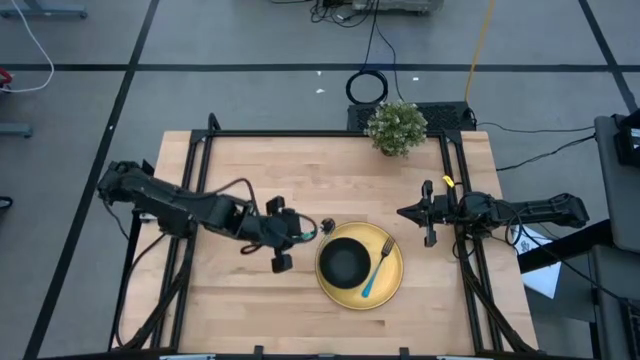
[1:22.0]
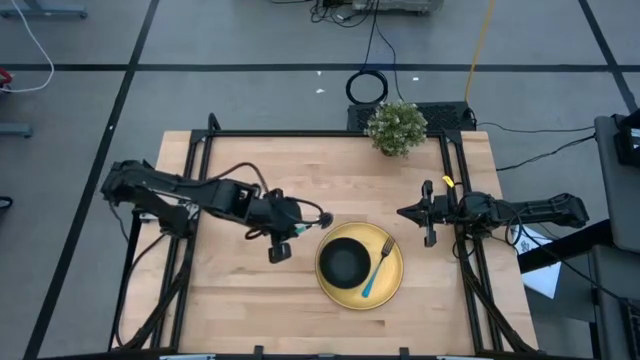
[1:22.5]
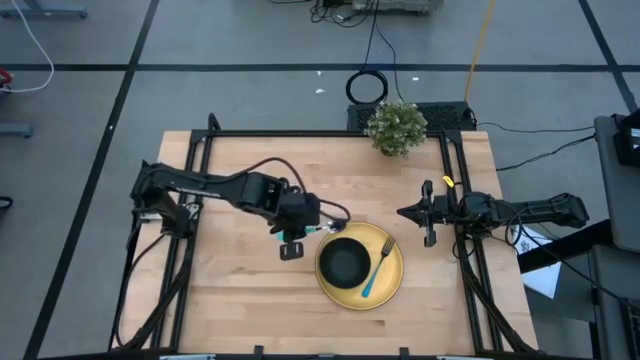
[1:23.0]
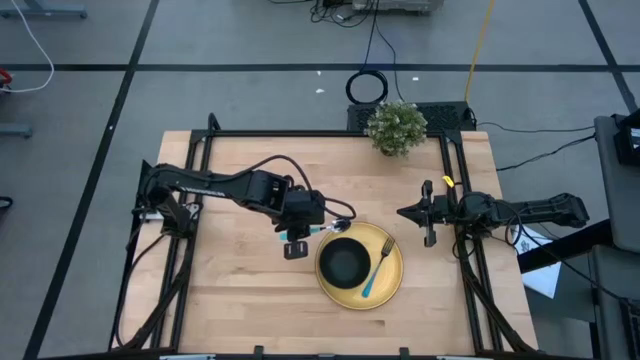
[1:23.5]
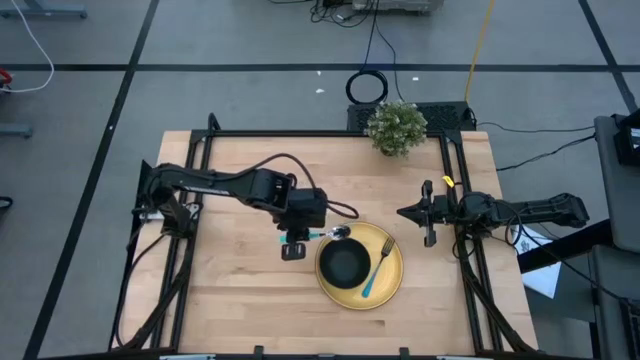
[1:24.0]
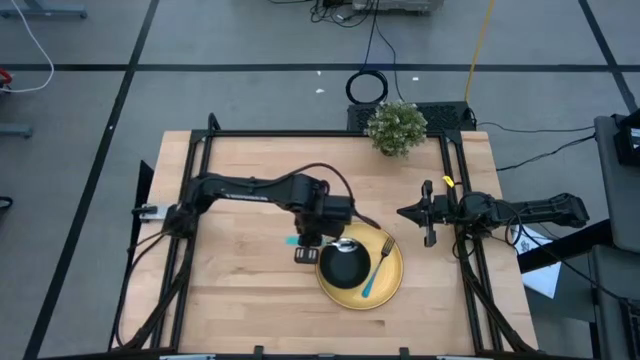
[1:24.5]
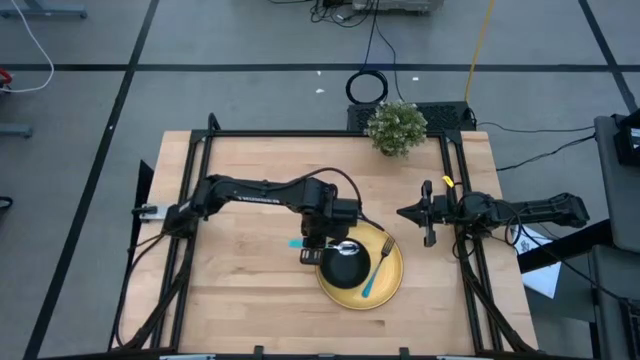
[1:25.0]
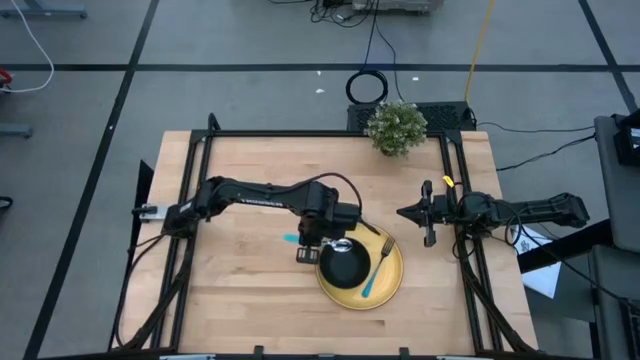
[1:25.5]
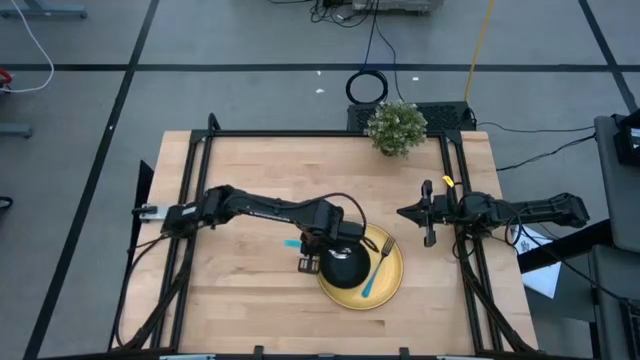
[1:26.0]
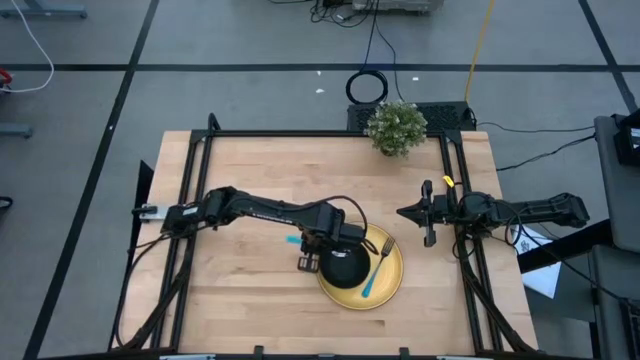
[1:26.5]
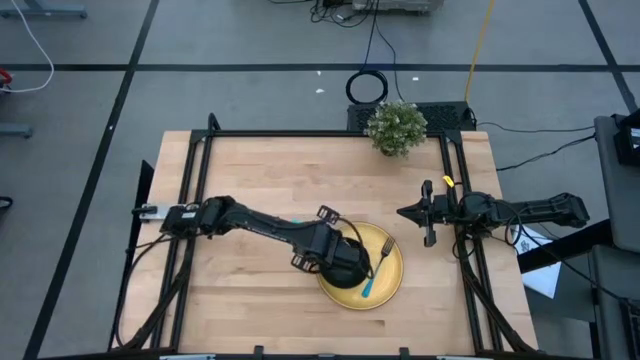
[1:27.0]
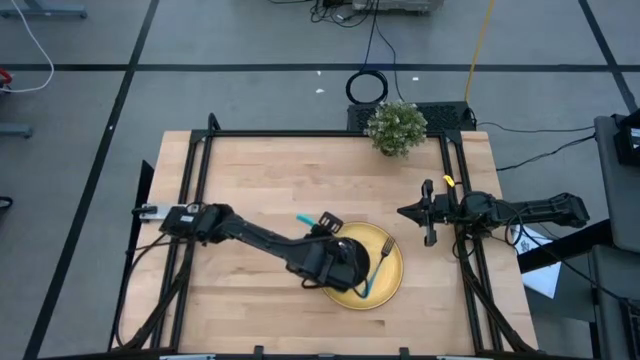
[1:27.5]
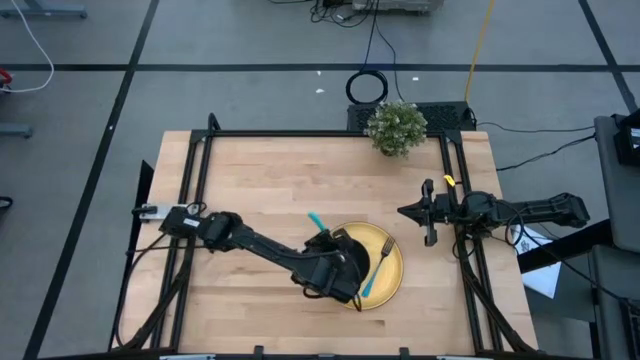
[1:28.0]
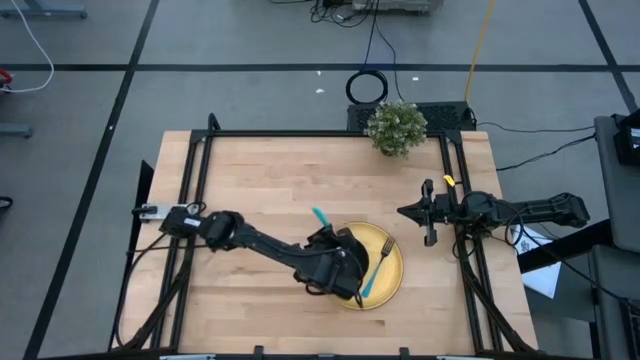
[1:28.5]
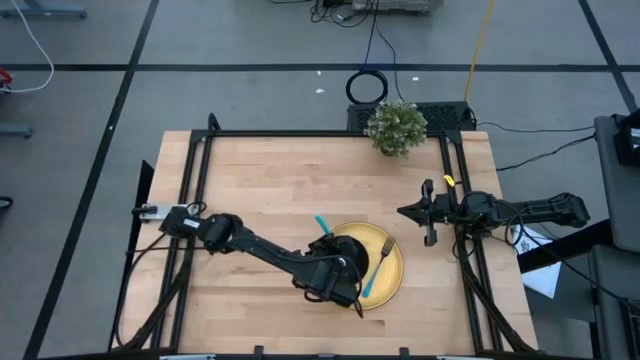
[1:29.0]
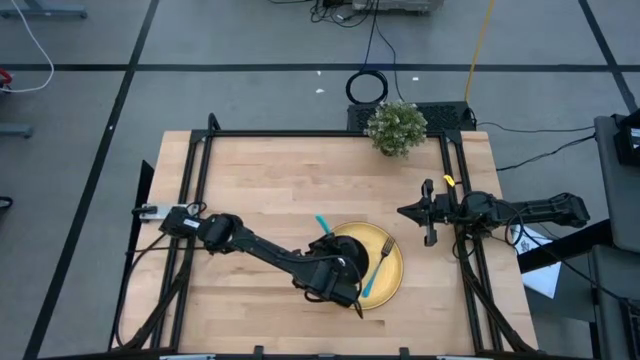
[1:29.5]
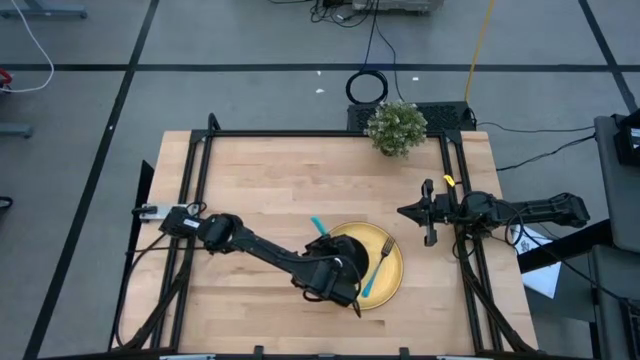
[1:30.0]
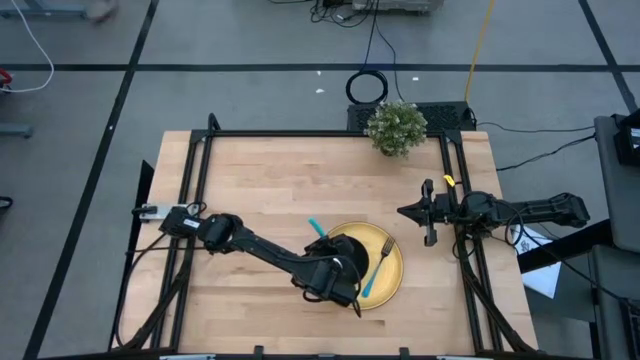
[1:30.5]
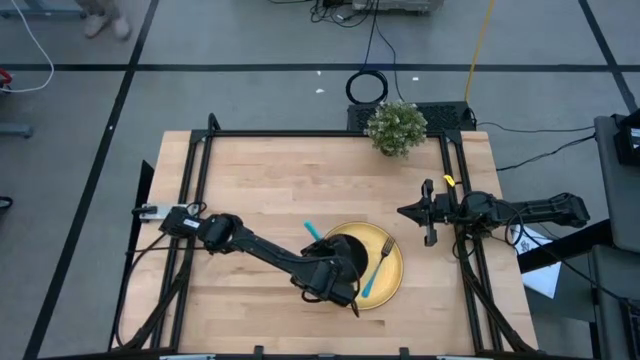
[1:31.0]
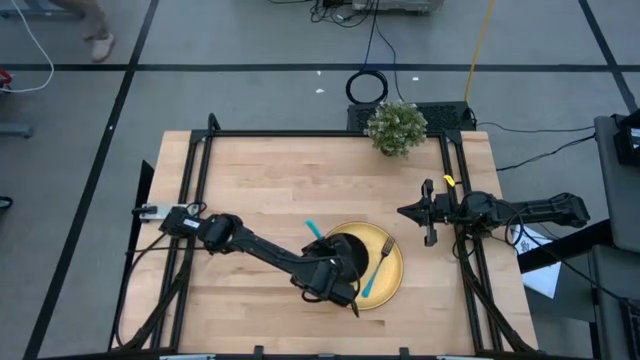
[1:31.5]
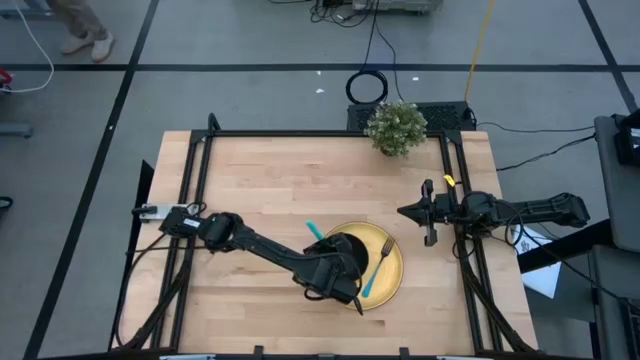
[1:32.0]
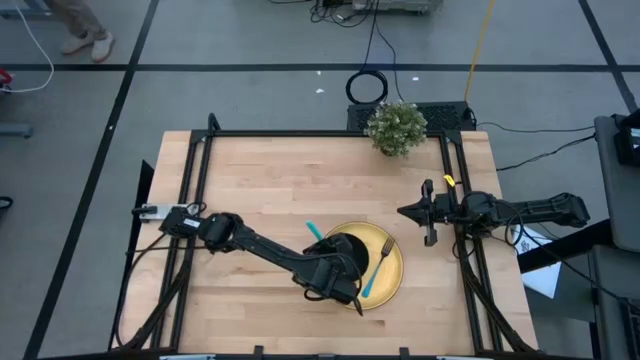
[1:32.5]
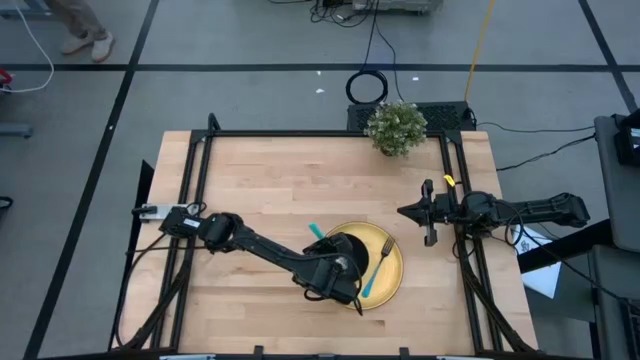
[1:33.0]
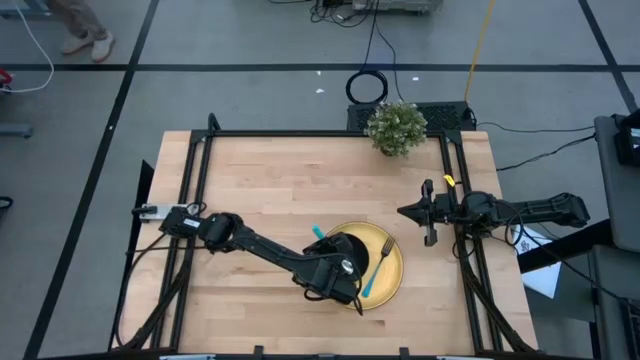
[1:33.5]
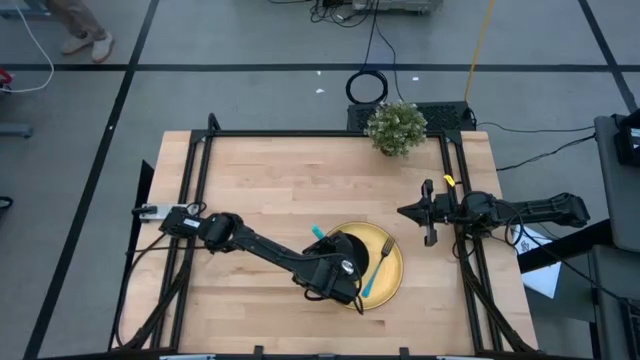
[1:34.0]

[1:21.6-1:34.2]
Task: Set table place
Put the blue spoon in the black bowl on the yellow plate

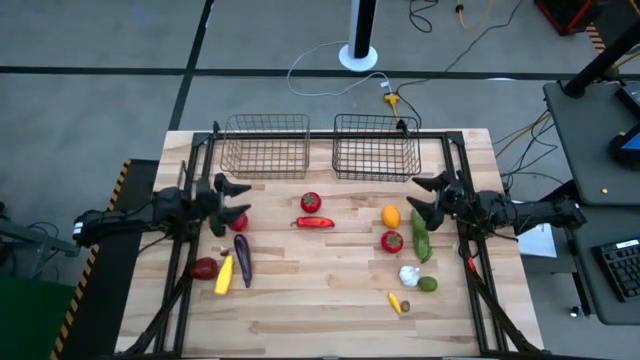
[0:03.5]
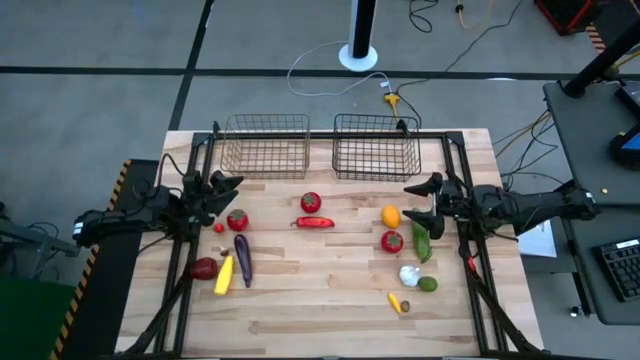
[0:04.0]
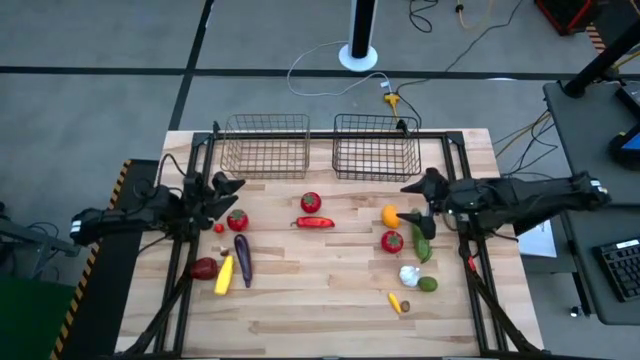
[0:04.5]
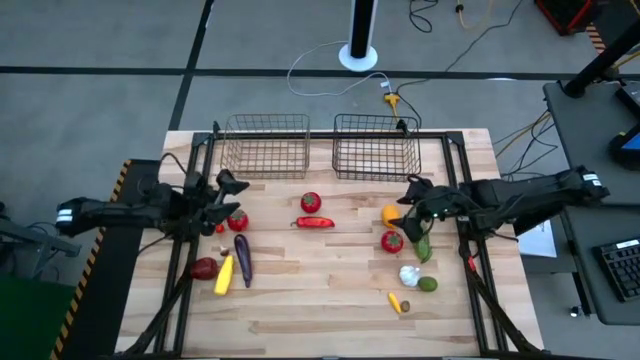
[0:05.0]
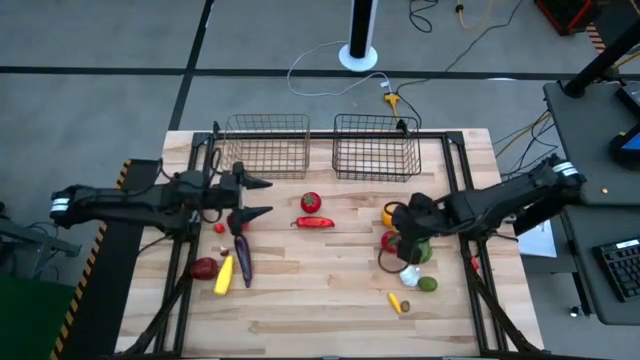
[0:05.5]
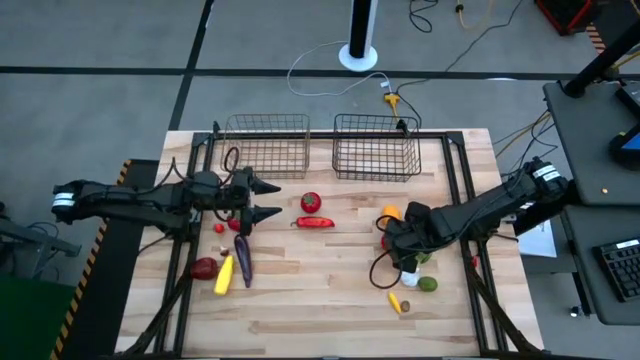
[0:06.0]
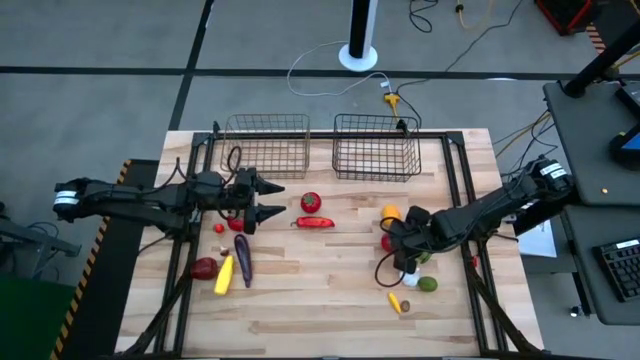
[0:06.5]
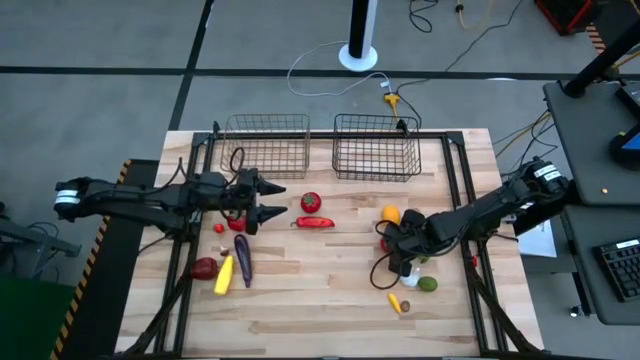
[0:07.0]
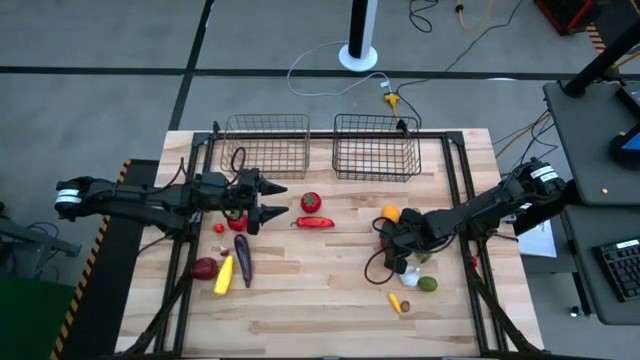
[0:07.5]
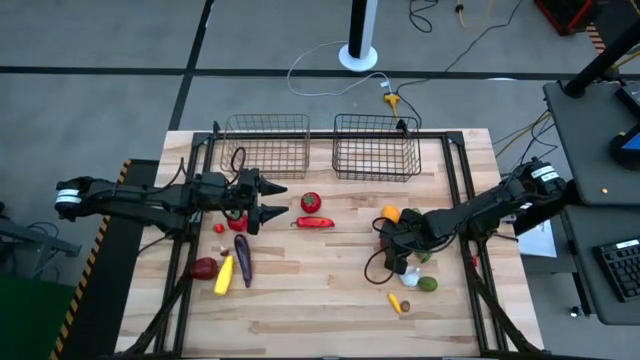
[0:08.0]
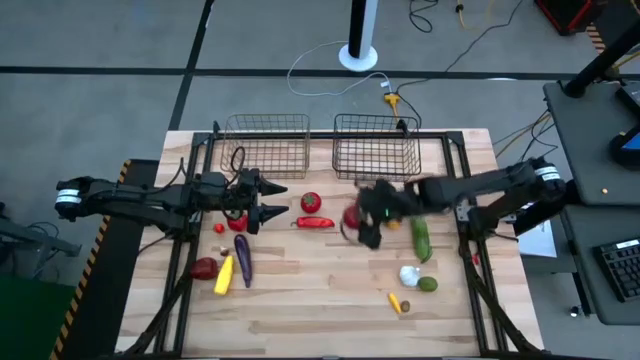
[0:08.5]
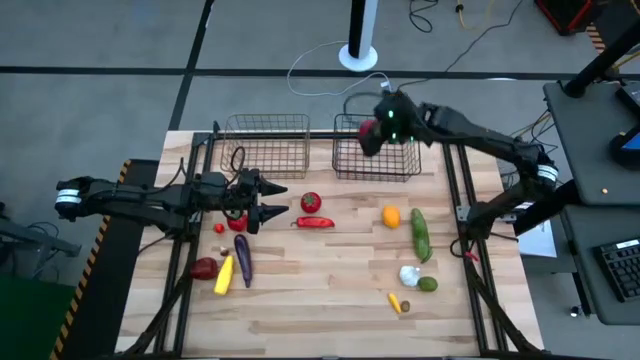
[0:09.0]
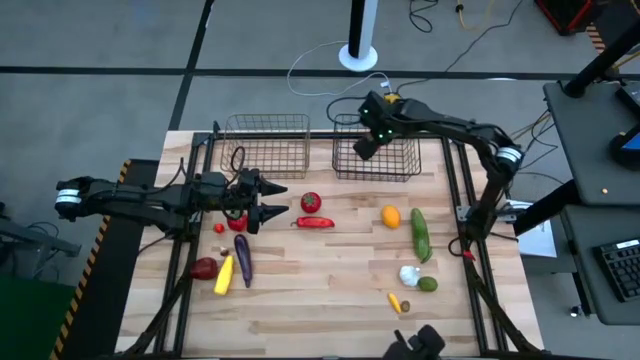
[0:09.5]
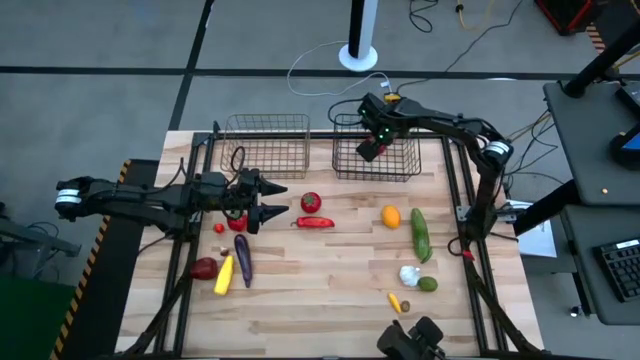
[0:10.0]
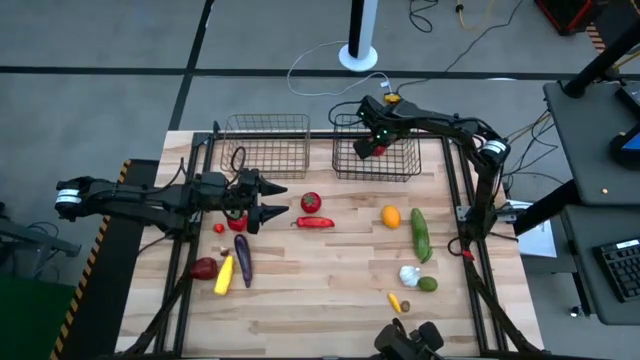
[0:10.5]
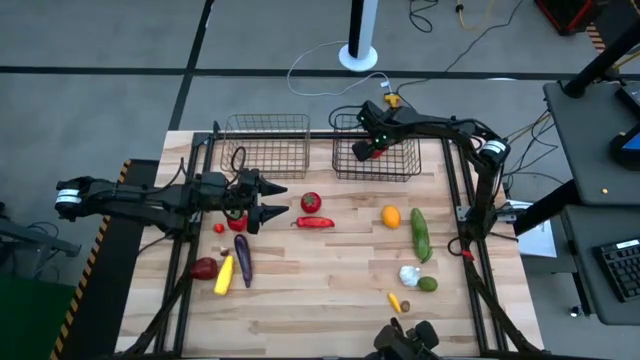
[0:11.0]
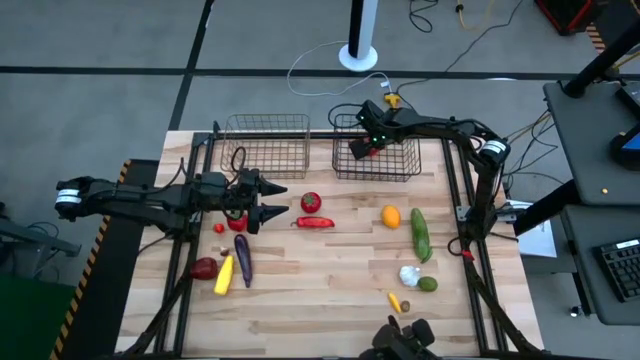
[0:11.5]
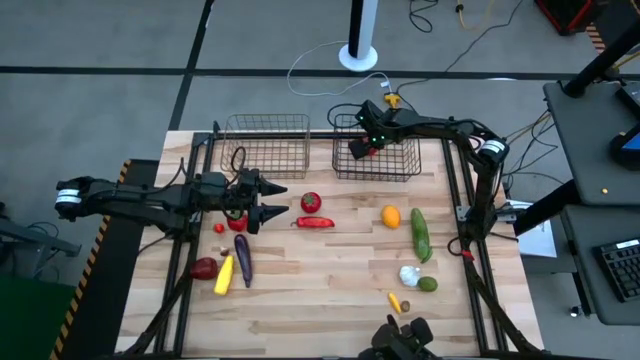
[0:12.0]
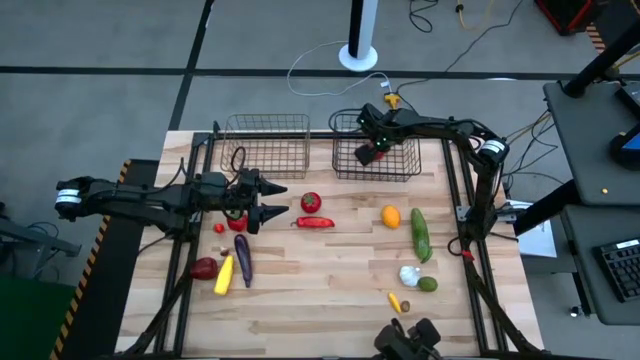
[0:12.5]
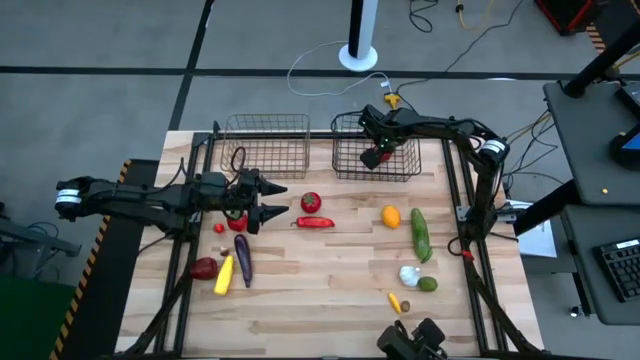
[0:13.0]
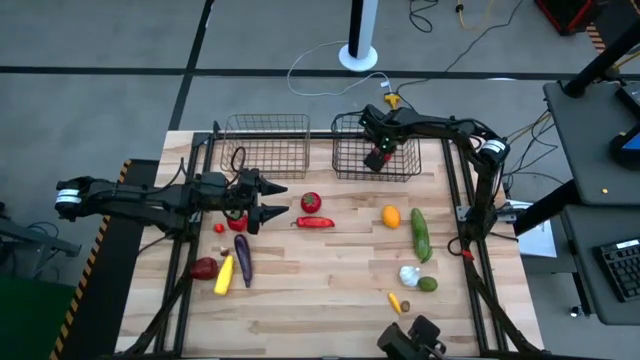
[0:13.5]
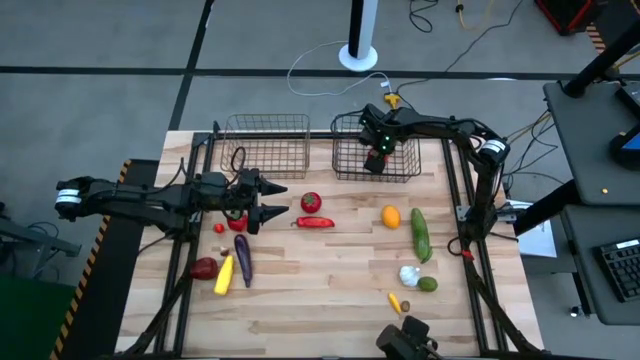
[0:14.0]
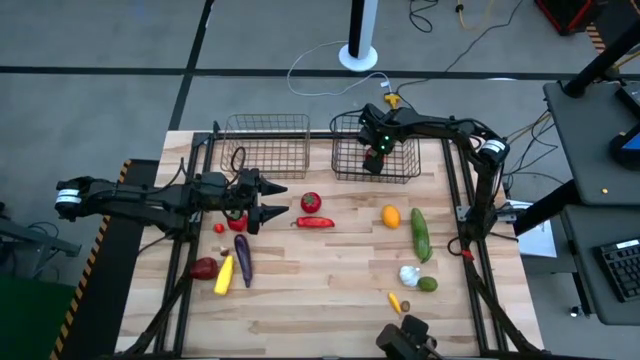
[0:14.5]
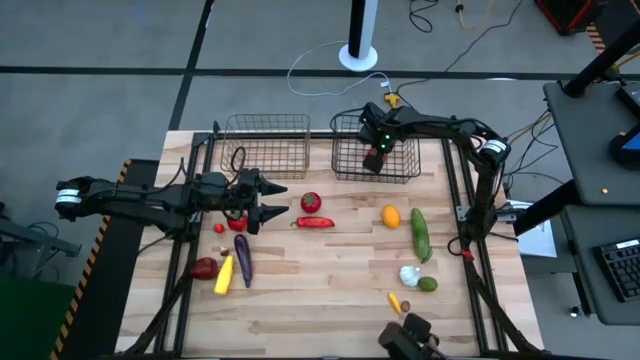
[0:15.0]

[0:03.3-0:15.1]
Task: Sort produce into baskets
Put the right large red tomato into the right wire basket
